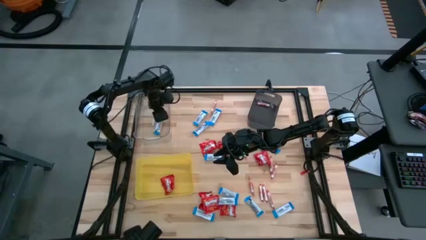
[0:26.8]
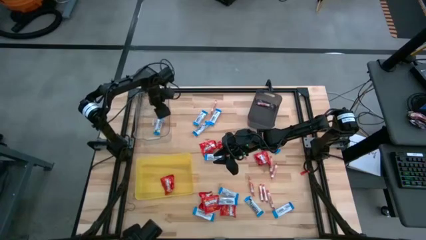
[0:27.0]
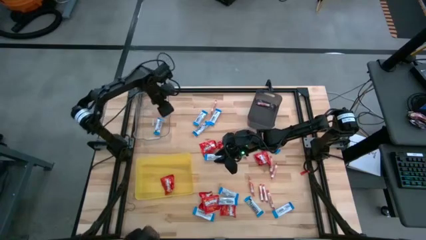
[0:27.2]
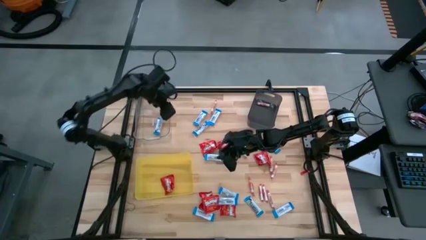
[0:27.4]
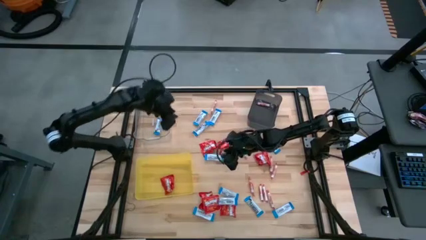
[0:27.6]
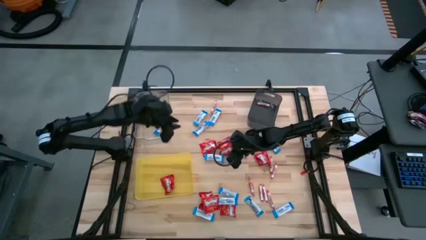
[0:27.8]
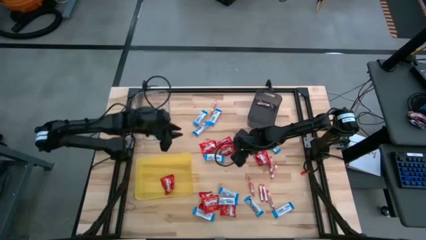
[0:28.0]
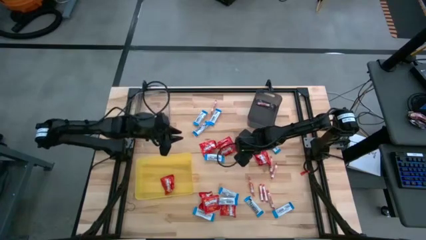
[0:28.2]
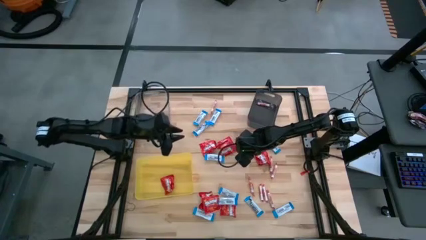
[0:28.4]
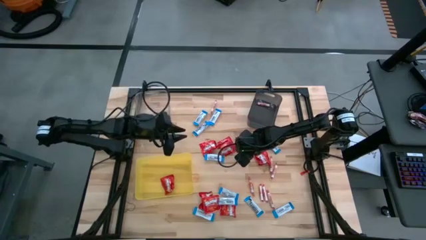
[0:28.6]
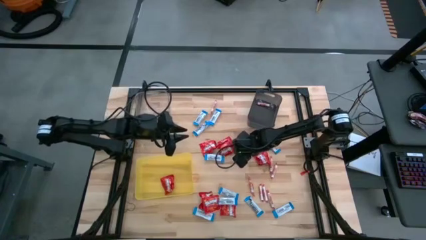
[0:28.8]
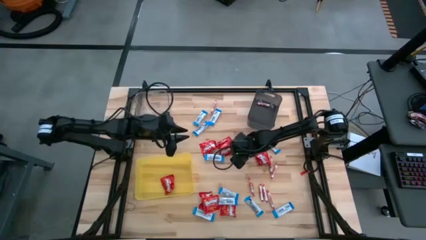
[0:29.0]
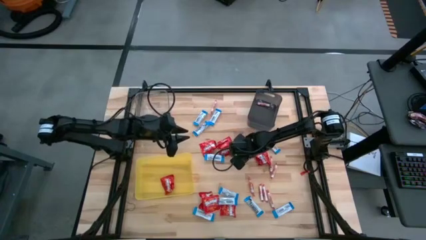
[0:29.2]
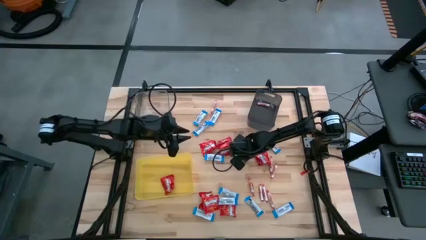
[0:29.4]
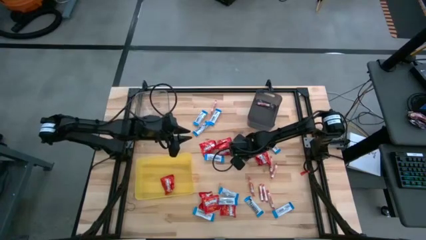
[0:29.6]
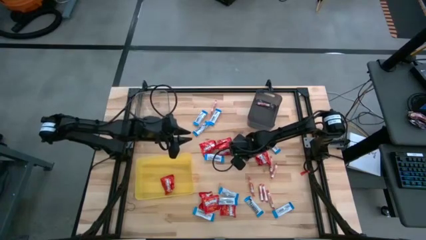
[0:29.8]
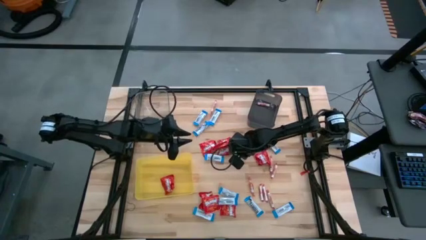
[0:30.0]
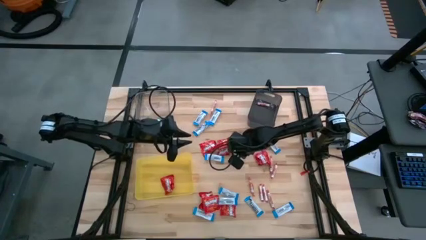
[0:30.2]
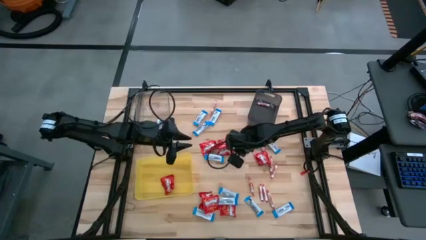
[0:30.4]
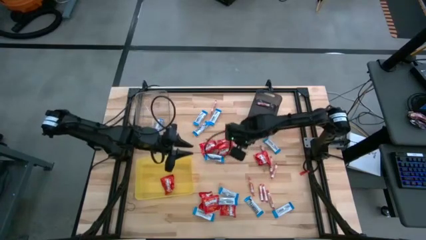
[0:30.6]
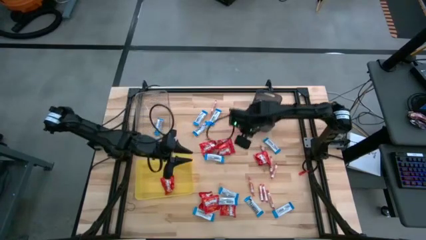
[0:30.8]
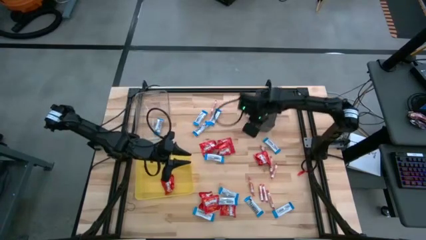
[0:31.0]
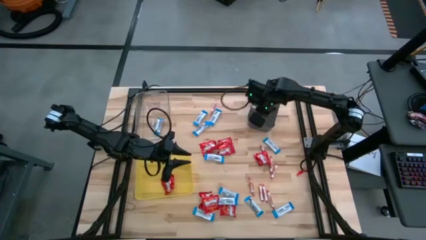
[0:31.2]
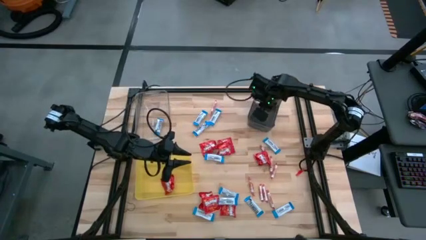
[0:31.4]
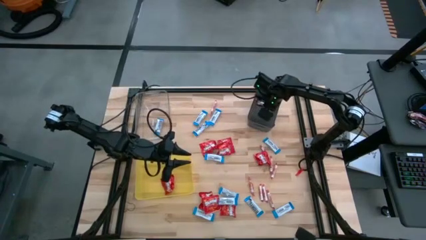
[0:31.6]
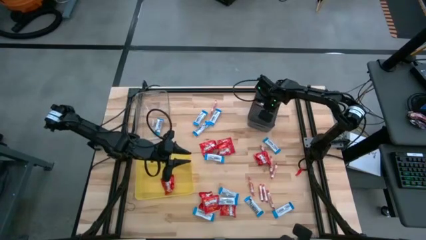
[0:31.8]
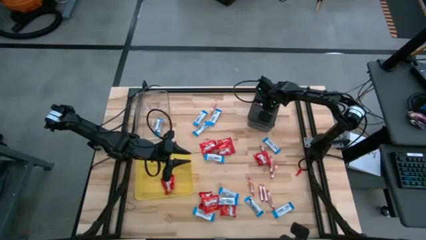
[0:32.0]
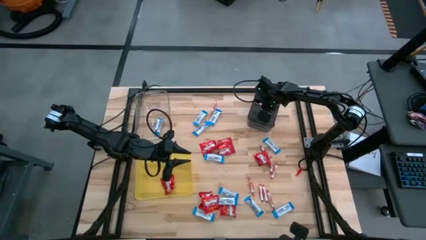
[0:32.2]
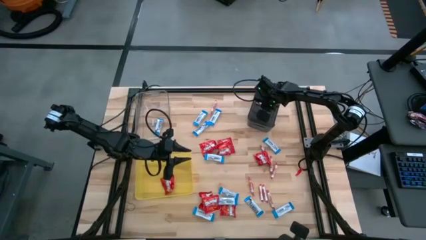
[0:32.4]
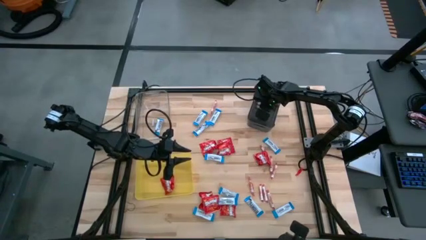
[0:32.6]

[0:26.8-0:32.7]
Task: Sort candy
Put the white candy into the black bin

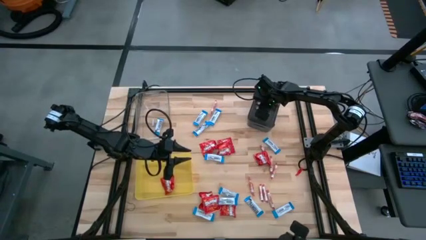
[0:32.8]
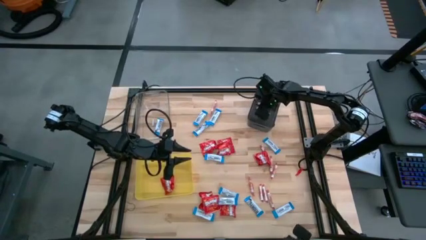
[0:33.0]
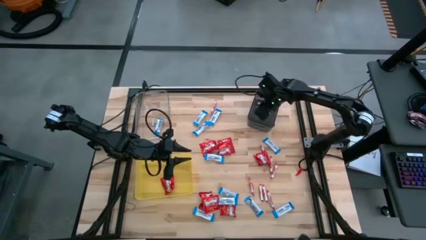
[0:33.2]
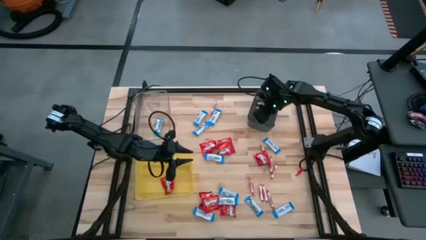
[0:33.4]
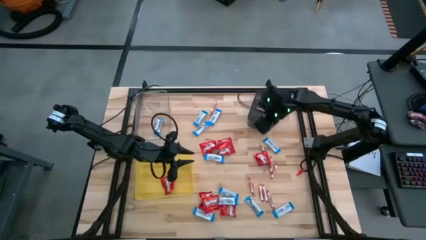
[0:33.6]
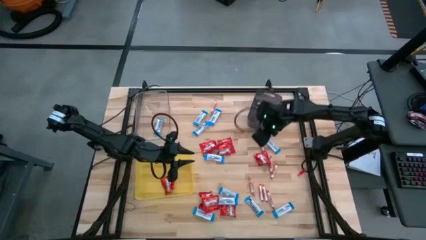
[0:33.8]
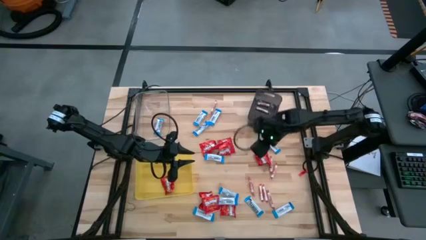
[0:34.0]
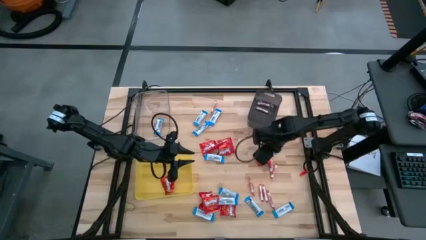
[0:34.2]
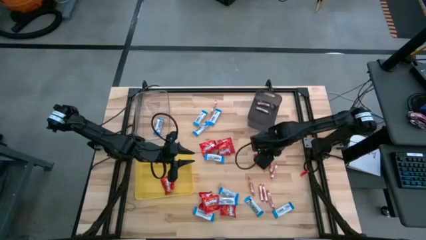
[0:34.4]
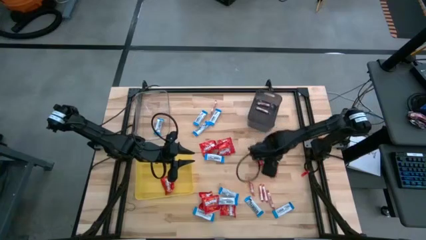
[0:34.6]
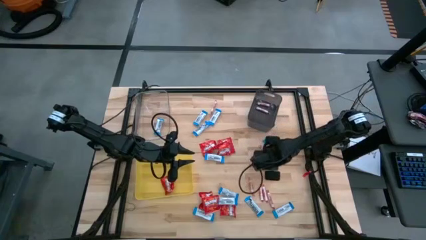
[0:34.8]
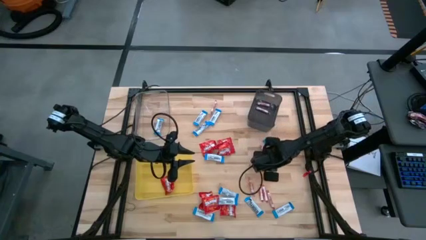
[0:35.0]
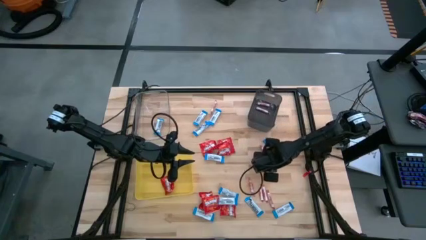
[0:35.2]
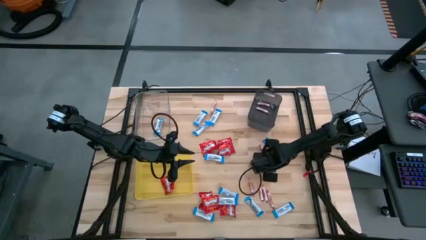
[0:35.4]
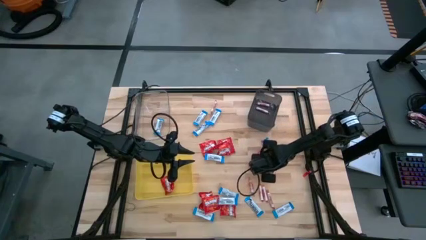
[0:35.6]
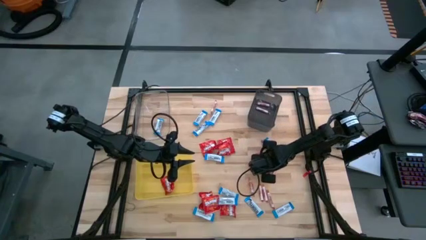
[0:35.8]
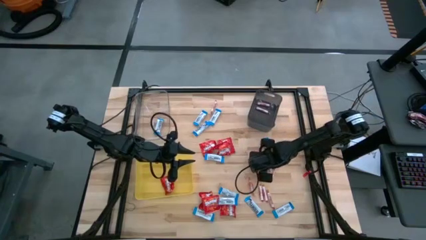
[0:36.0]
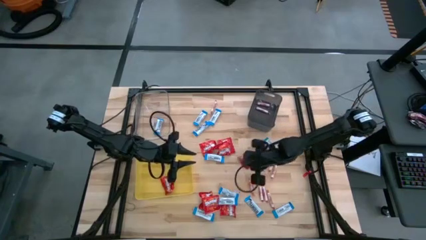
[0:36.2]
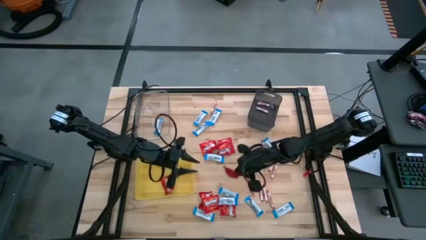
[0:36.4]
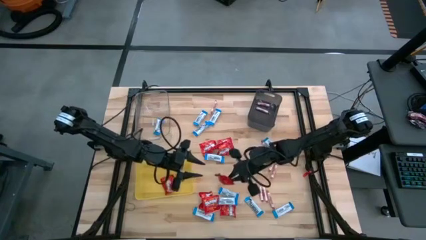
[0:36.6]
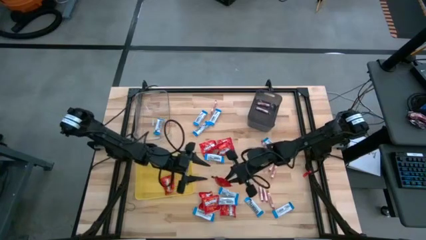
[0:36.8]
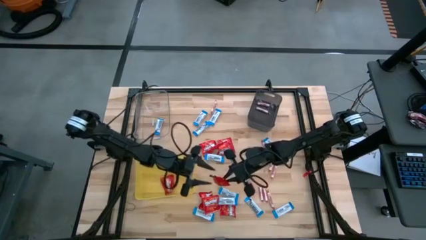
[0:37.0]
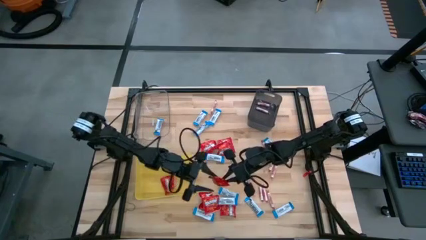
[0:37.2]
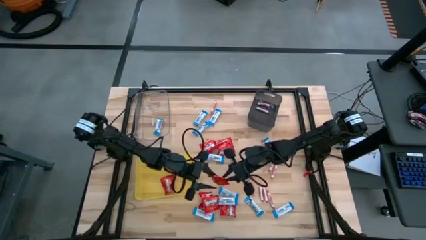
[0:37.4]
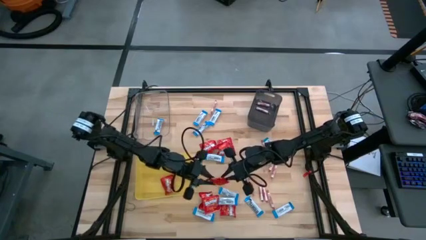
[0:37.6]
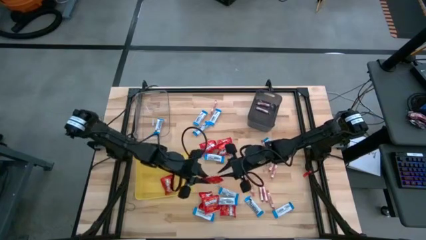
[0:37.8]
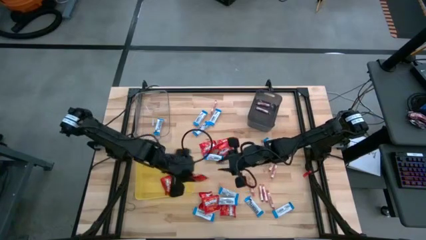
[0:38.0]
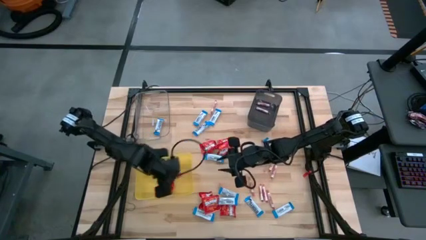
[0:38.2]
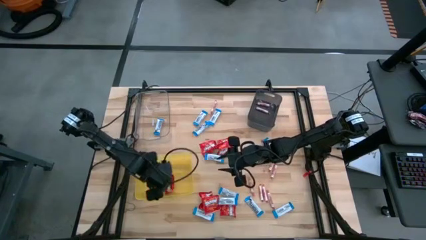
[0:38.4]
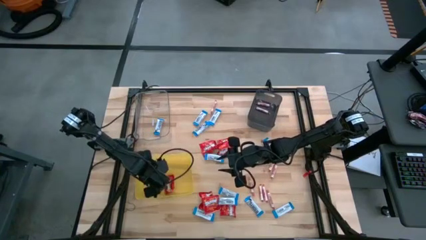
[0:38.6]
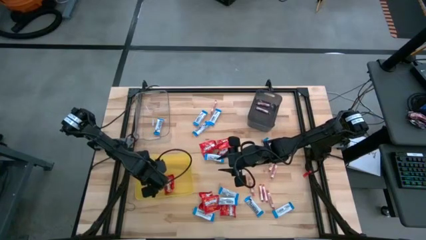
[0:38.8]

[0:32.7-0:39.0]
Put the red chocolate into the yellow bin

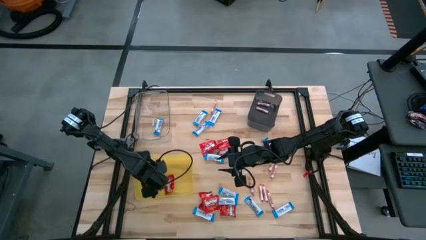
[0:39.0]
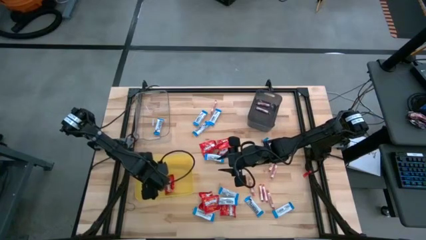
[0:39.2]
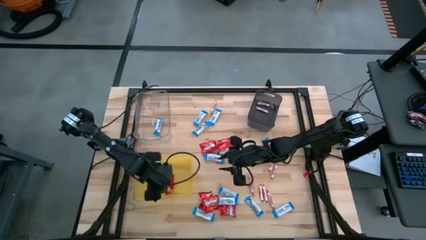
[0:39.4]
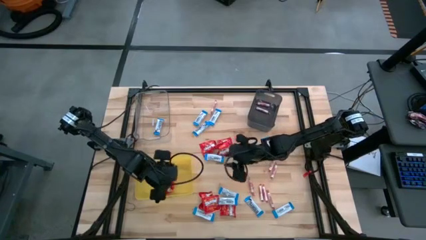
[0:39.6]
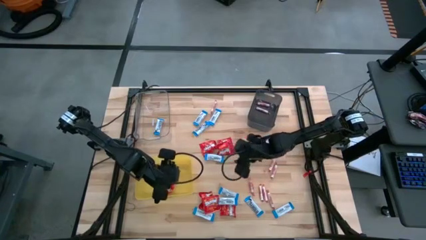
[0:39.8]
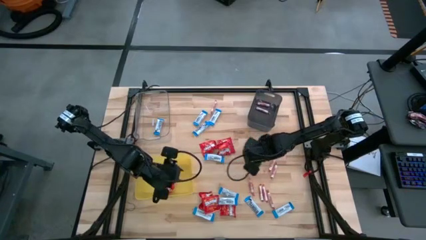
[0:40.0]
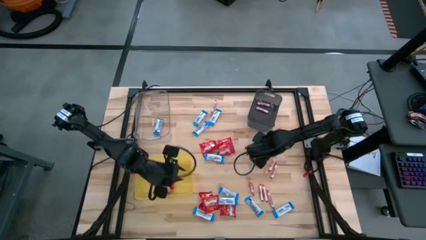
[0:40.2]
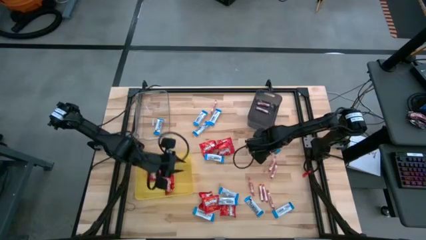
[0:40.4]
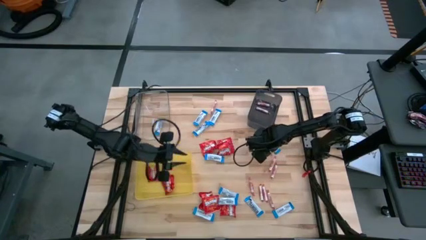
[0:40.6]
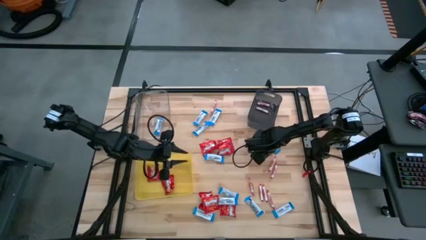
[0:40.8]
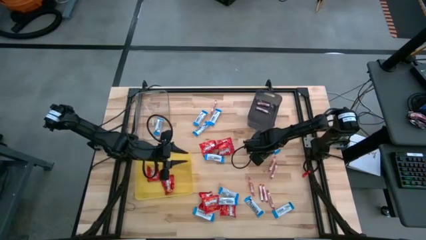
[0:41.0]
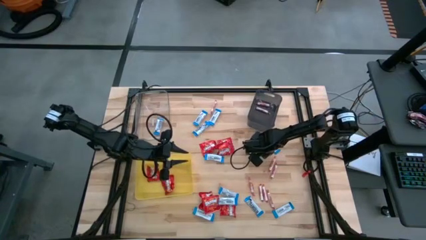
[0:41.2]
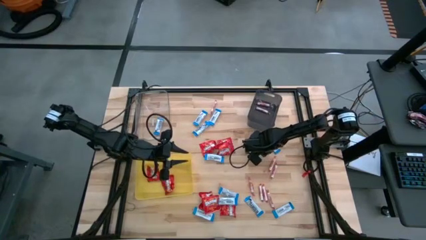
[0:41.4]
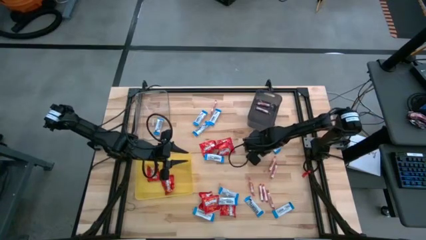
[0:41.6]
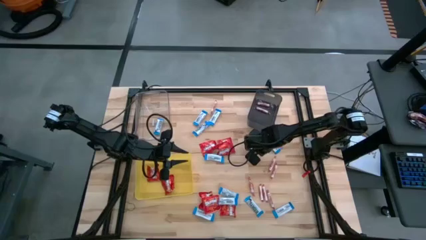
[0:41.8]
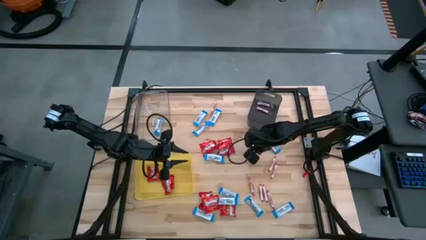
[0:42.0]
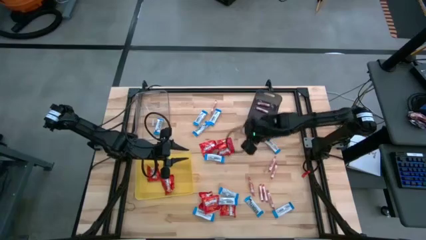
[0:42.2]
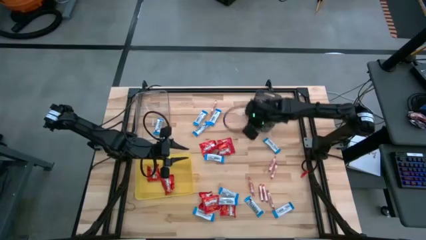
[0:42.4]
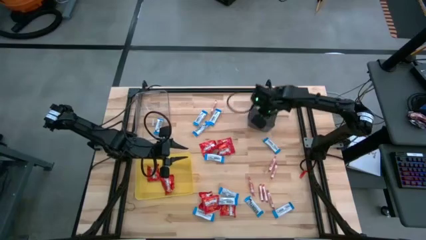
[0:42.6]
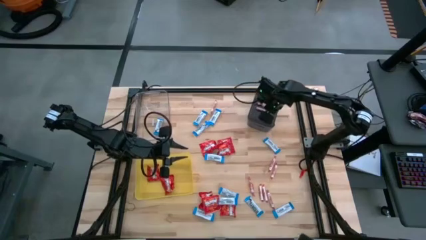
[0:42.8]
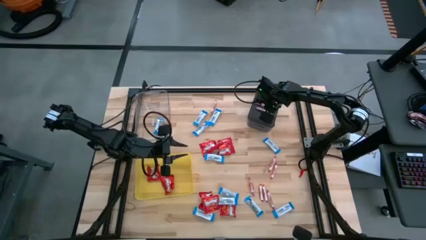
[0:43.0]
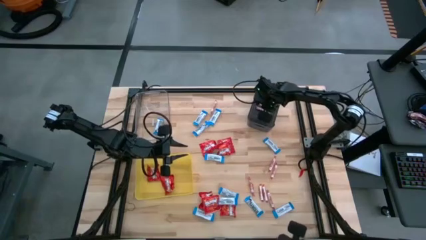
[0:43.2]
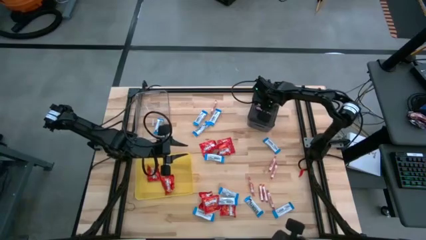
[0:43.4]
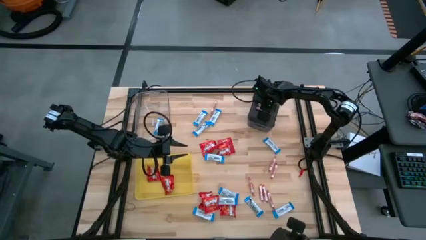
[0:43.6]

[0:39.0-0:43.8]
Put the white candy into the black bin
